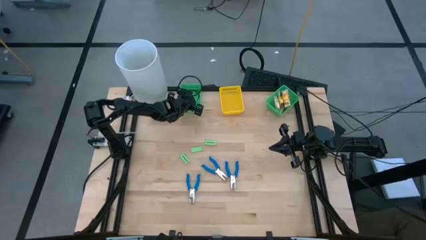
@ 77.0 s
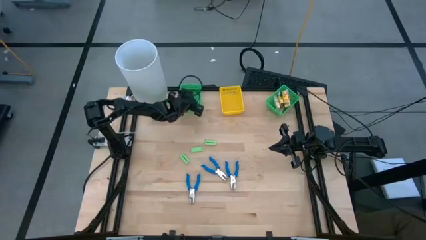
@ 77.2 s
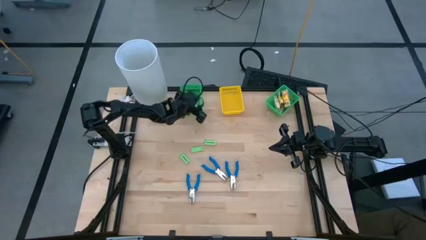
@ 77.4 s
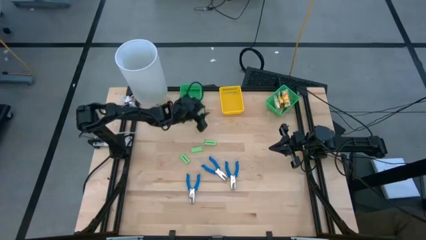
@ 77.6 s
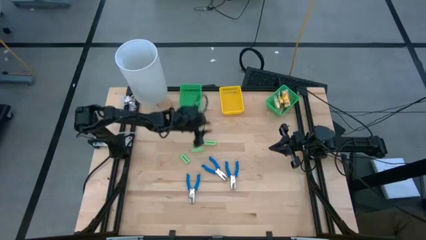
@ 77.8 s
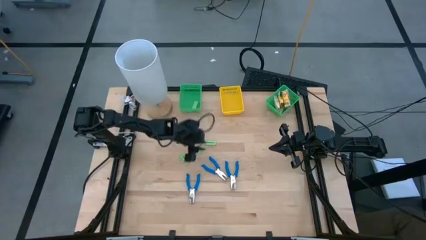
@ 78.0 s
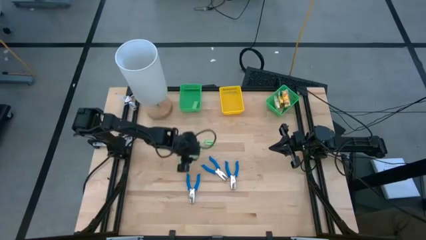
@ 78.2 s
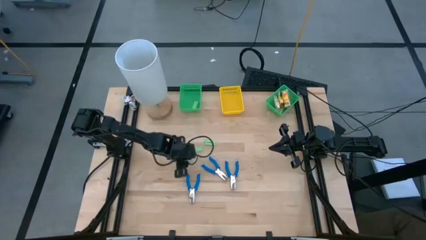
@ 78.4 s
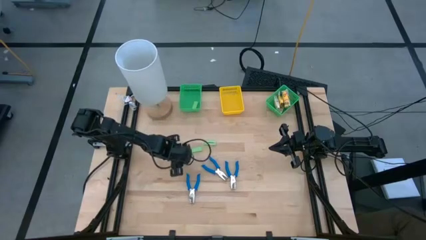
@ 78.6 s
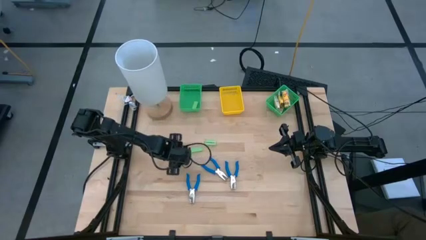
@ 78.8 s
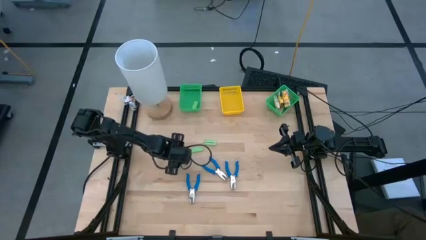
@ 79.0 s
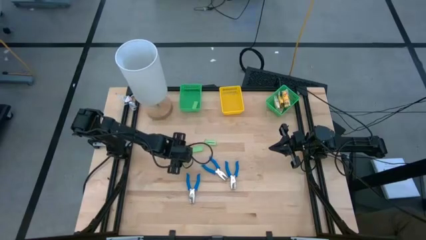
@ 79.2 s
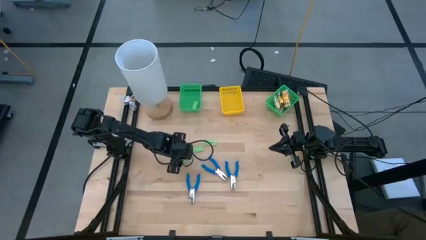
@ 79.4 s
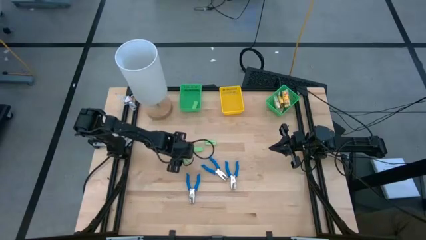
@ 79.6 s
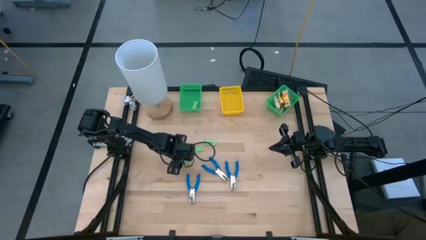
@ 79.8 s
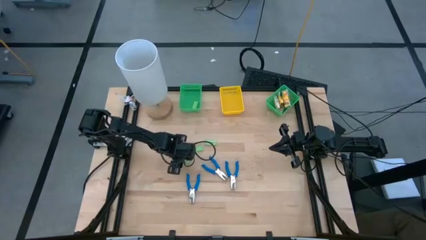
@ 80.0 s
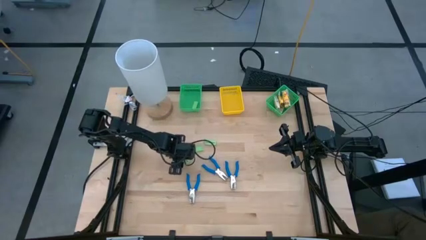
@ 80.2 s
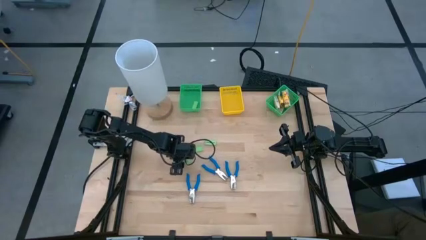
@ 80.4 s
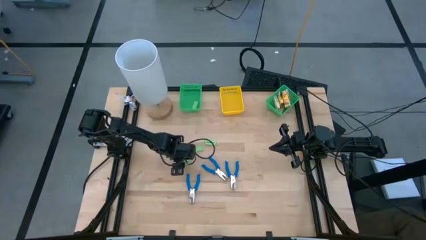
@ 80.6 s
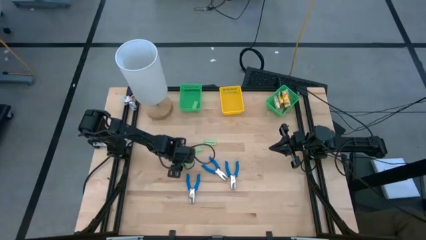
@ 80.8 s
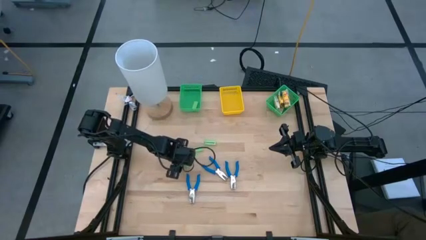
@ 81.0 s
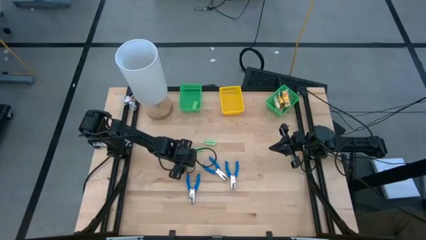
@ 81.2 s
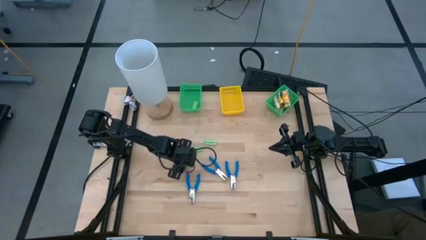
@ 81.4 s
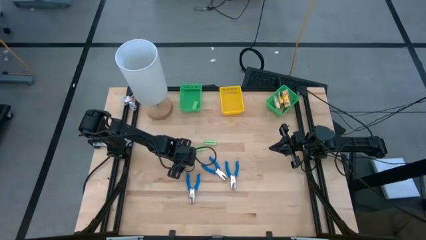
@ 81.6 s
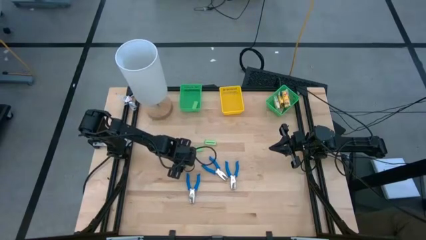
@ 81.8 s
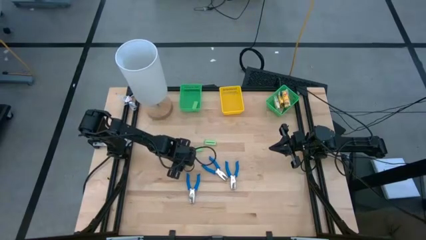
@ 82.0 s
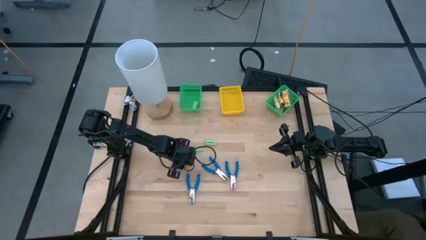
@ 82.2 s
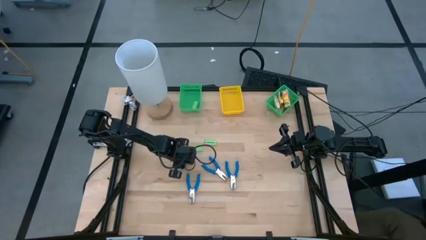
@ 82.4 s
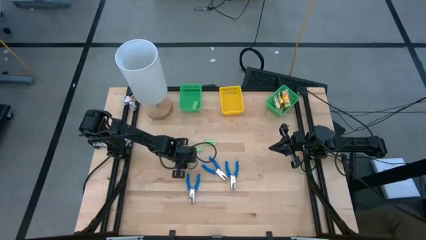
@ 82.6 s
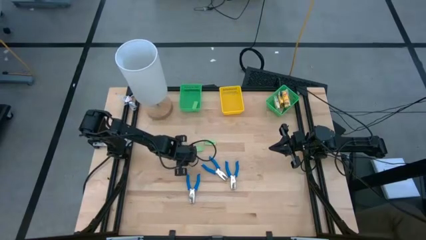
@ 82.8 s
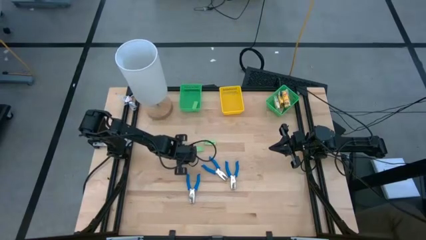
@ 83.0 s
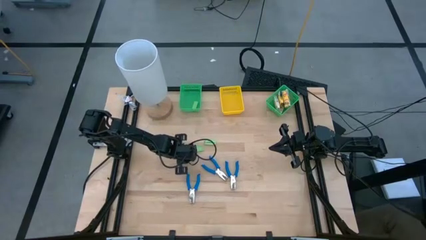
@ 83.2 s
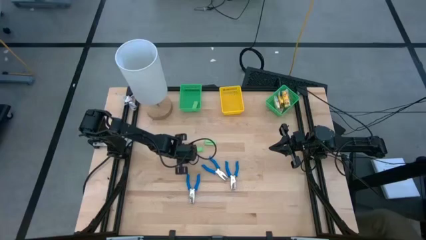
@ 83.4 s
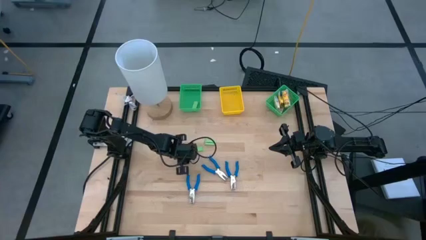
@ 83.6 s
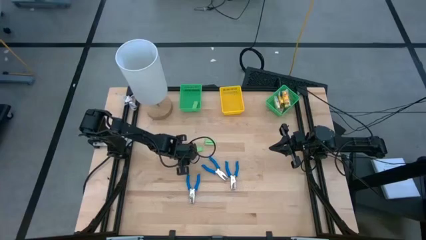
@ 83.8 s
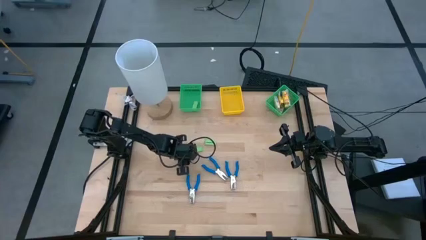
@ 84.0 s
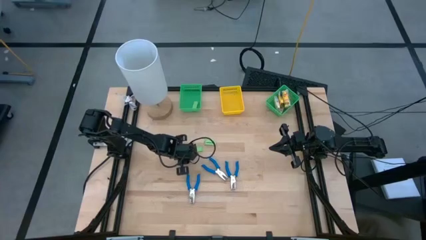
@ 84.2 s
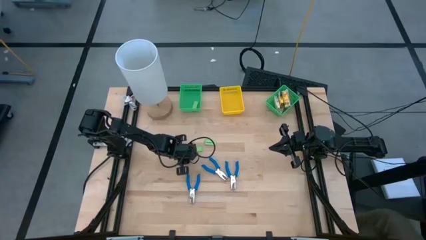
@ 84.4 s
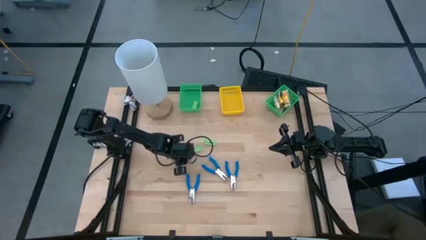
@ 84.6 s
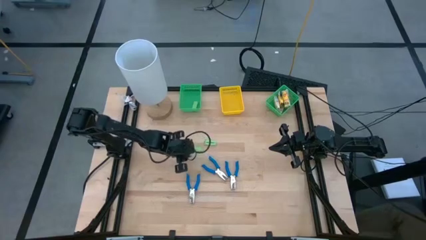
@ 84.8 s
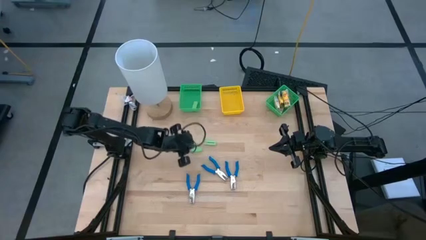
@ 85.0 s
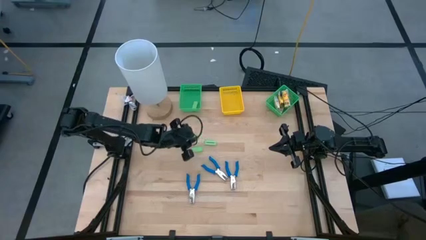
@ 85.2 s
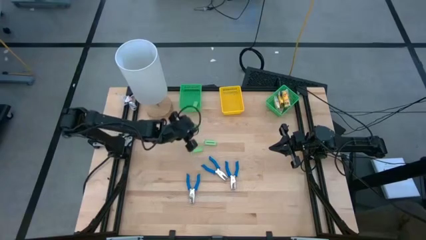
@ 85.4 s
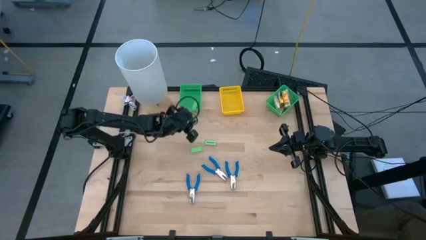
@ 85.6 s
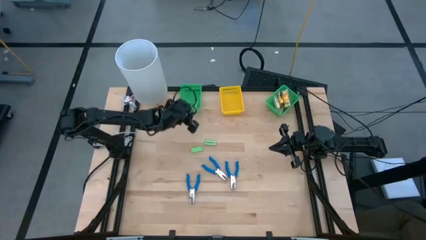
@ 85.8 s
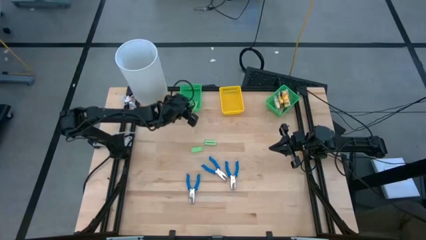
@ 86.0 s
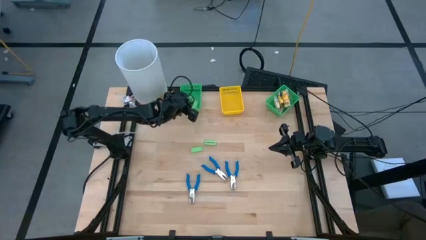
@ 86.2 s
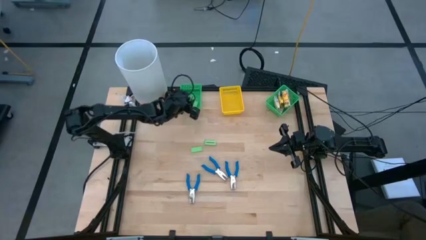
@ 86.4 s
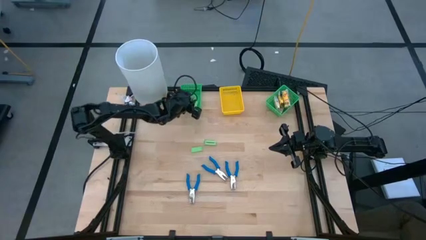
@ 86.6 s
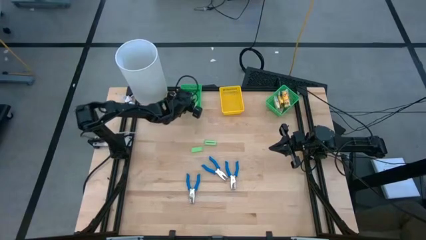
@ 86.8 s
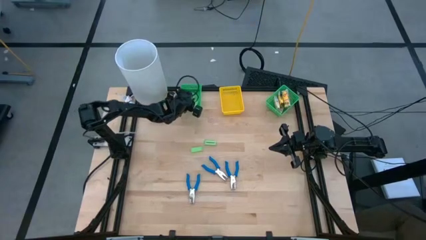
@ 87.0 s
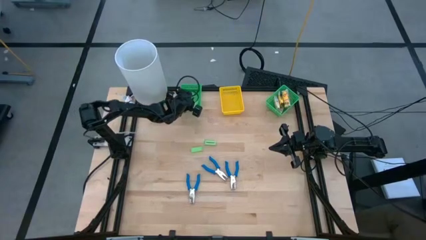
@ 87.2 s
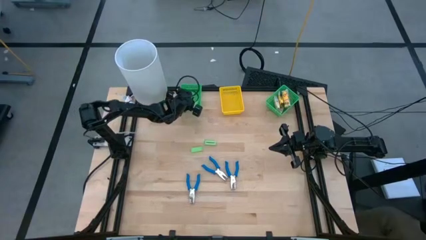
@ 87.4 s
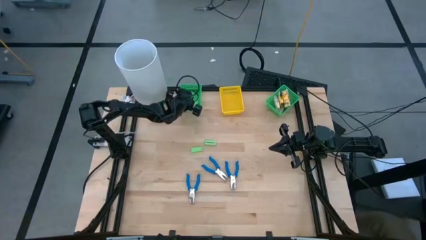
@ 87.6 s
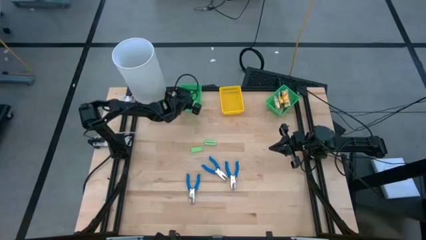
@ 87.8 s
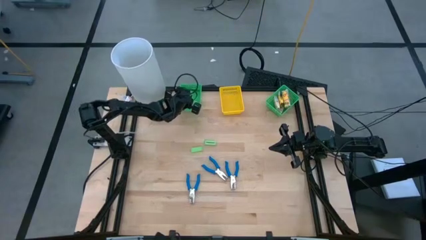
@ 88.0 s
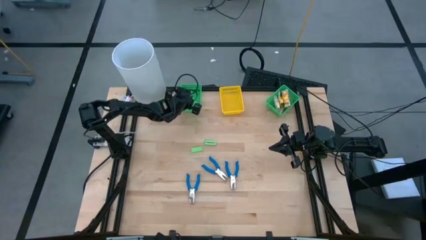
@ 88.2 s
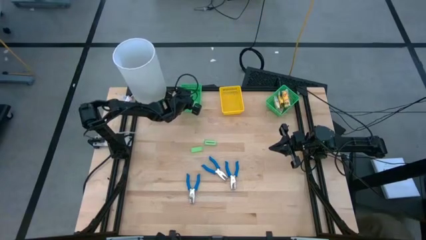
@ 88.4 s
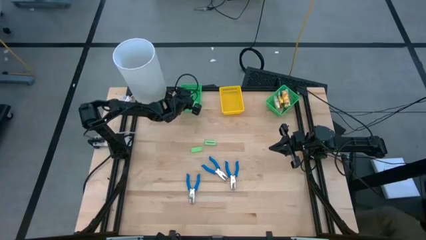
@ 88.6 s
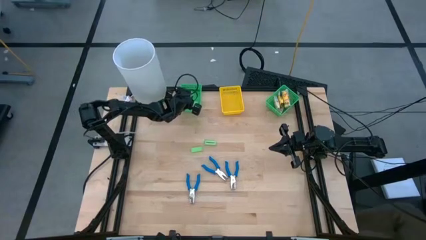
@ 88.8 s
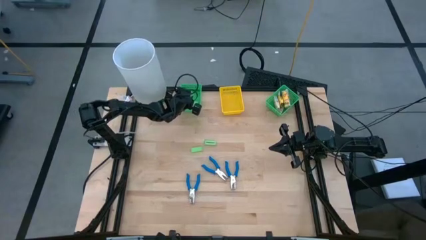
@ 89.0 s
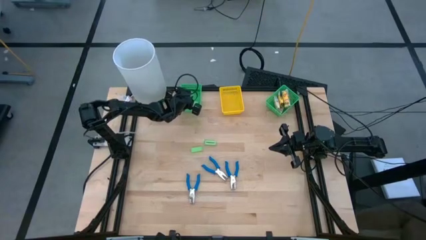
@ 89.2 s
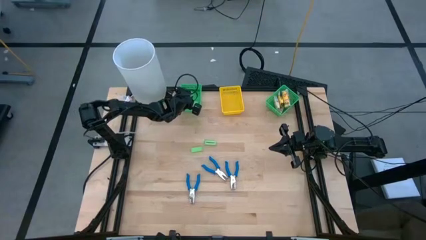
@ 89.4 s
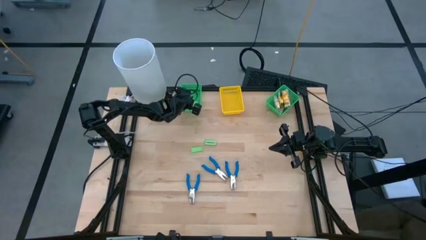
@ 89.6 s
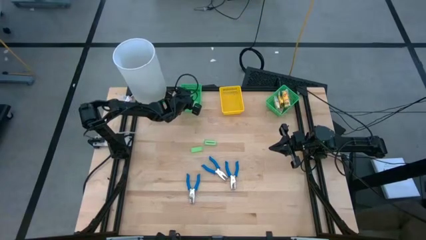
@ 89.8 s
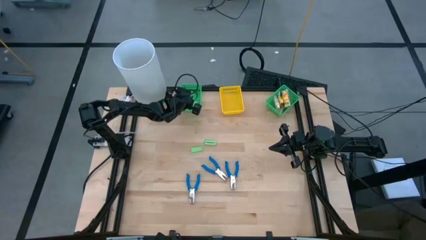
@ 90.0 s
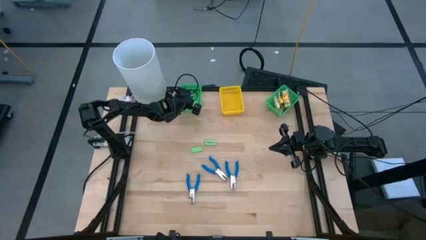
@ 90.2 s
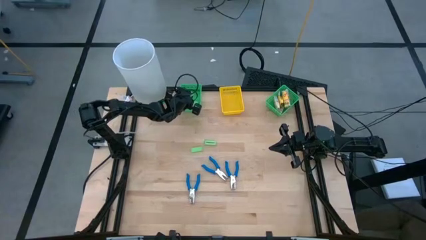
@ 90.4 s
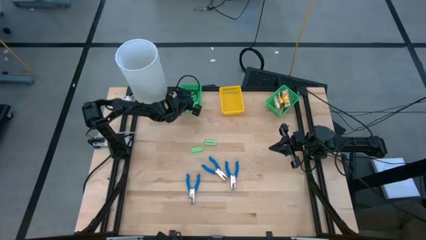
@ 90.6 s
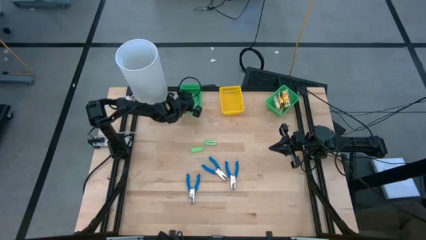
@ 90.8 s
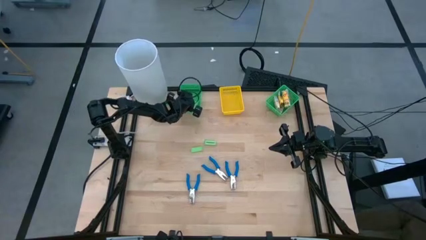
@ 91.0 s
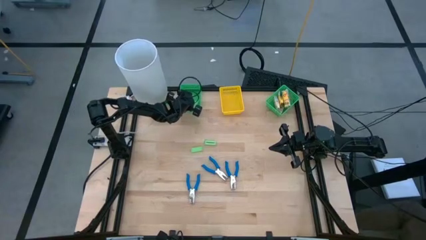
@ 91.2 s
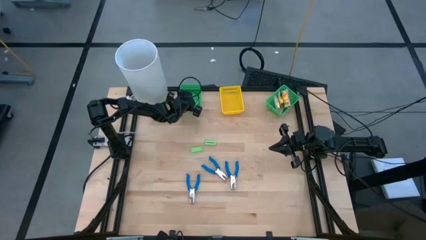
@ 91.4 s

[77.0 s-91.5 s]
Task: Pick & Place School Supplies
Put the green eraser into the left green bin

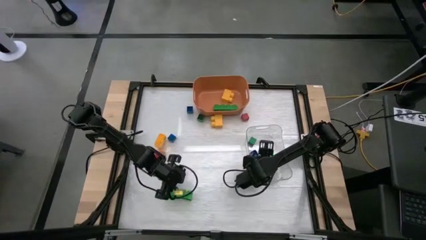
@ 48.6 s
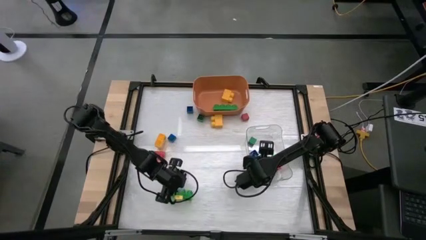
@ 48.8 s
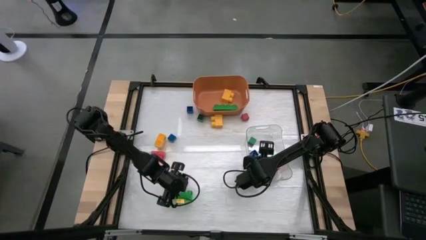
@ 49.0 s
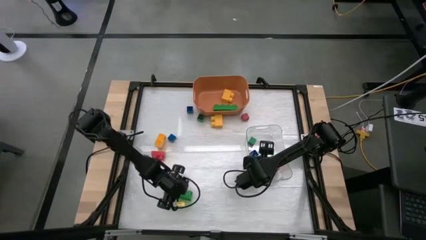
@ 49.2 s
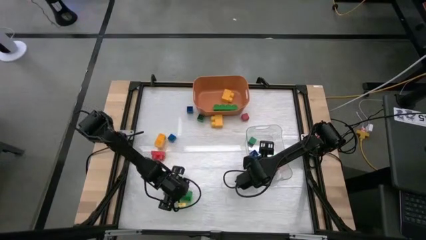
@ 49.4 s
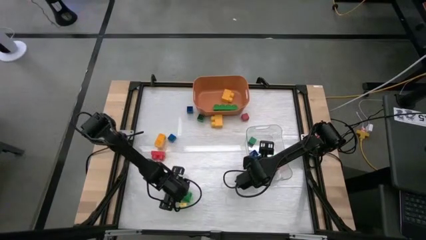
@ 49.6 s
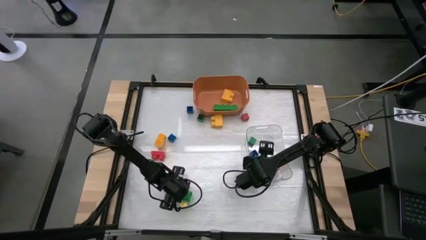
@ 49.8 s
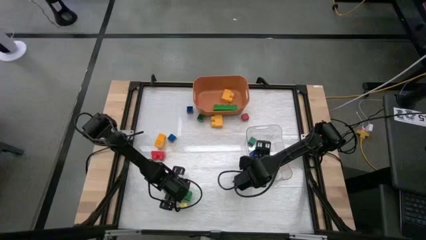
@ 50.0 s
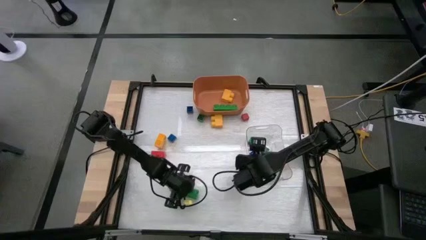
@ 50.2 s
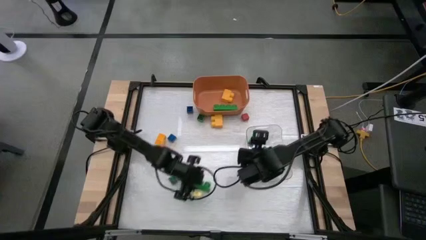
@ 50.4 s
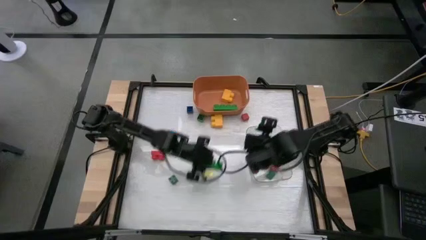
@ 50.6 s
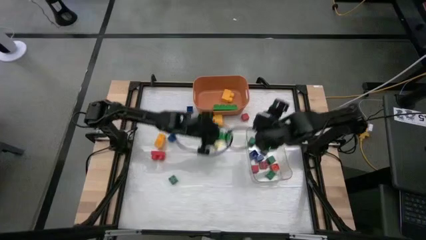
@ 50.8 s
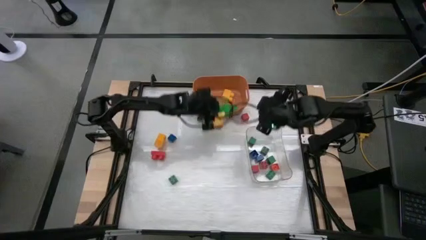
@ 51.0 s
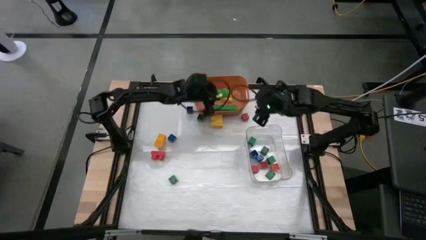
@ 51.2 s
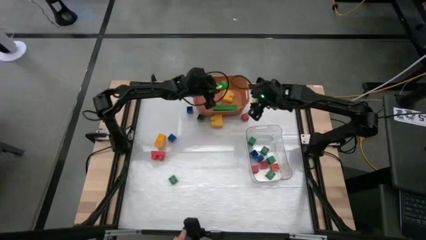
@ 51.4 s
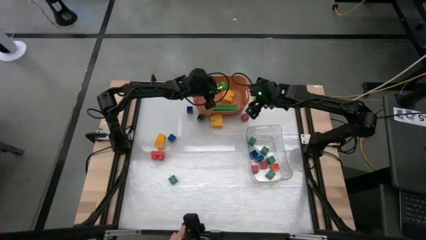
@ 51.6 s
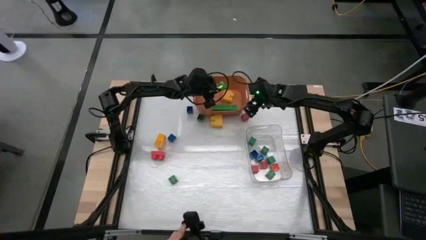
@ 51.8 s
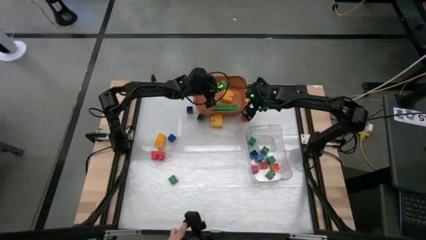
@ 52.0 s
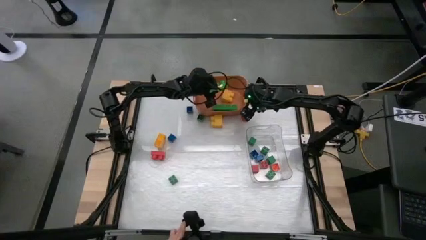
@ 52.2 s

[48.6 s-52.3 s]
Task: Sort blocks by size
Put the big green game piece into the orange bin
